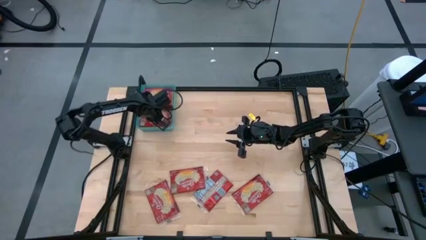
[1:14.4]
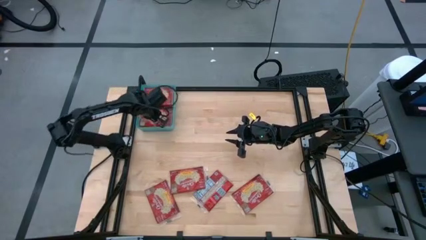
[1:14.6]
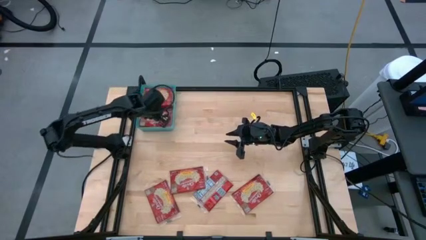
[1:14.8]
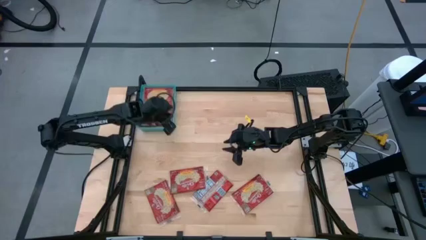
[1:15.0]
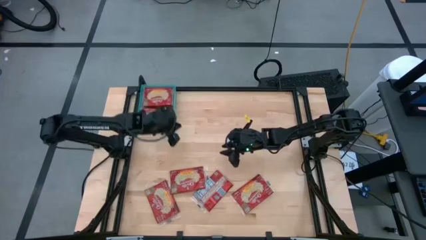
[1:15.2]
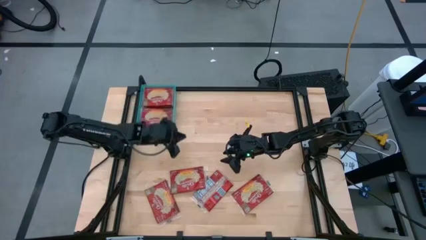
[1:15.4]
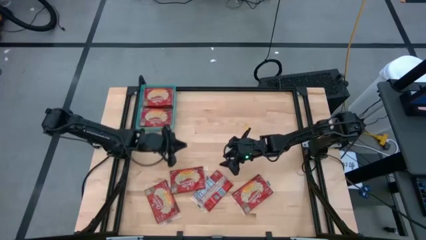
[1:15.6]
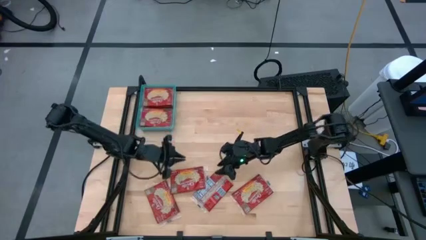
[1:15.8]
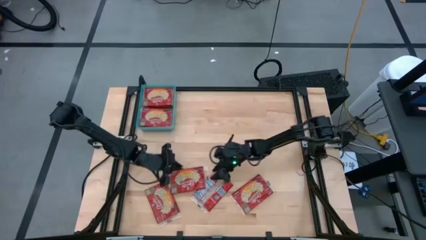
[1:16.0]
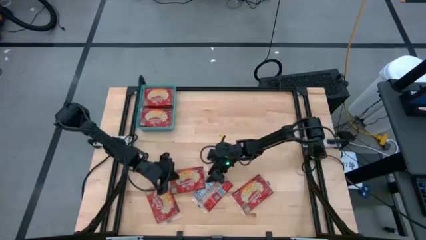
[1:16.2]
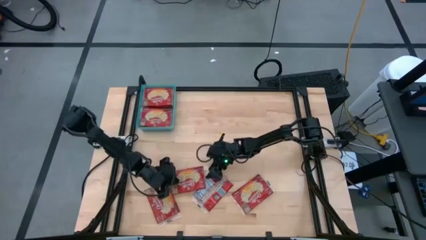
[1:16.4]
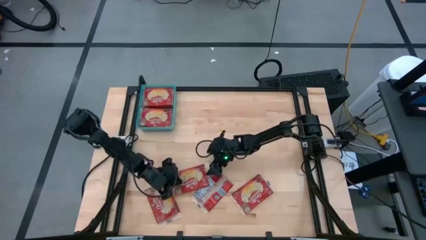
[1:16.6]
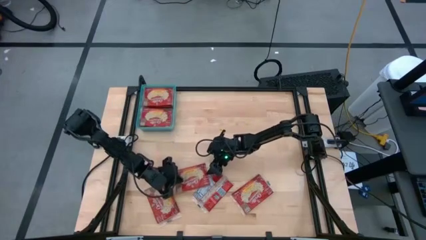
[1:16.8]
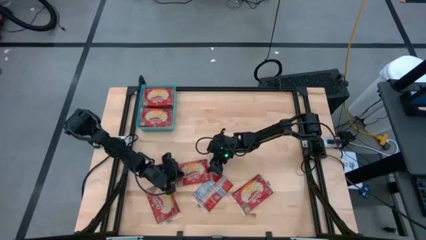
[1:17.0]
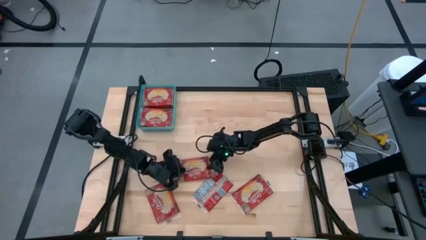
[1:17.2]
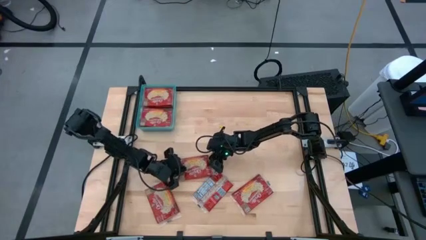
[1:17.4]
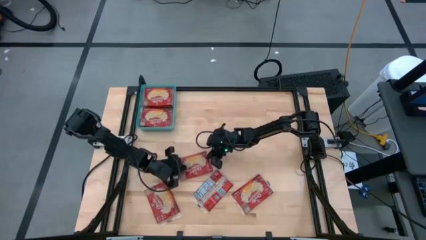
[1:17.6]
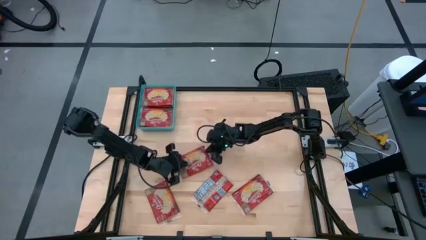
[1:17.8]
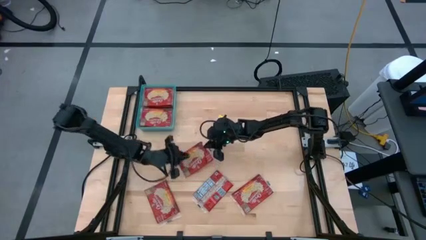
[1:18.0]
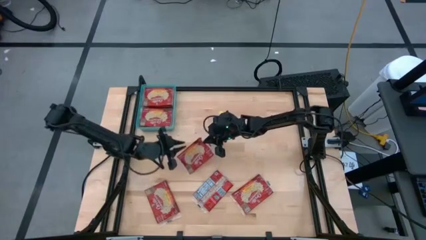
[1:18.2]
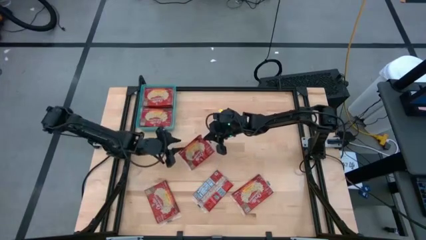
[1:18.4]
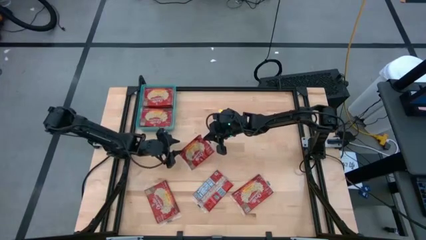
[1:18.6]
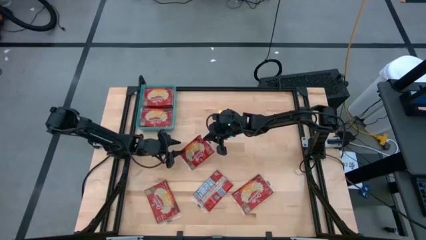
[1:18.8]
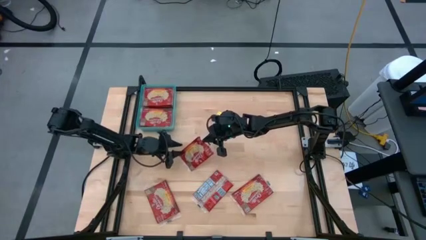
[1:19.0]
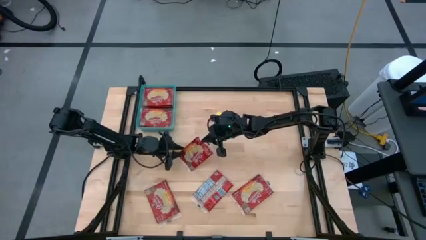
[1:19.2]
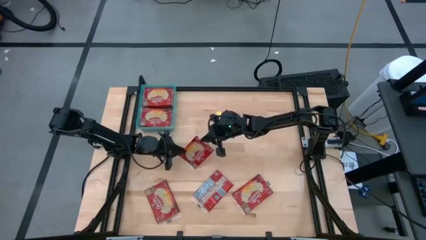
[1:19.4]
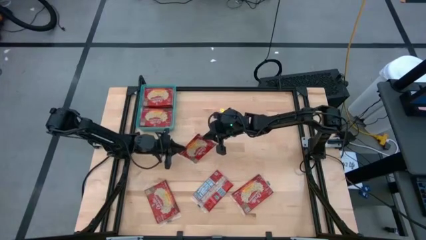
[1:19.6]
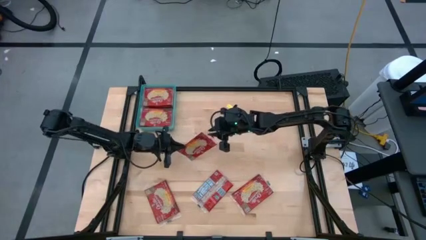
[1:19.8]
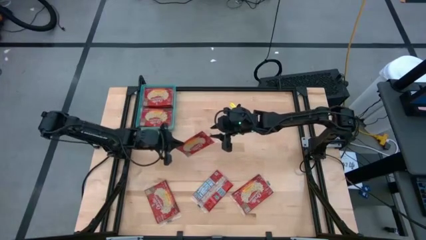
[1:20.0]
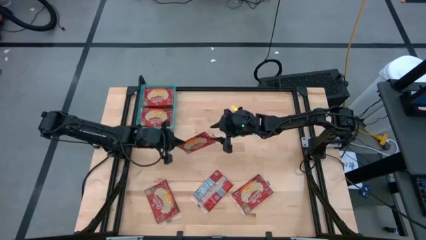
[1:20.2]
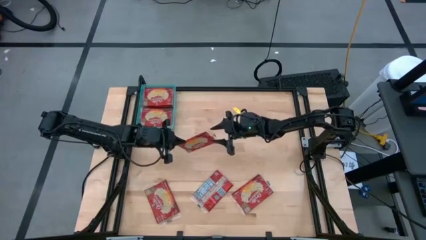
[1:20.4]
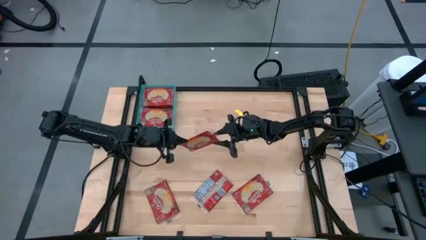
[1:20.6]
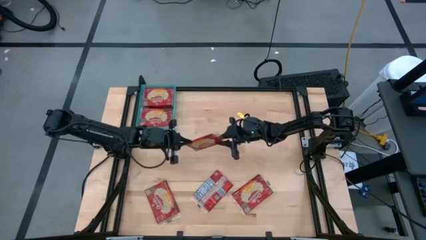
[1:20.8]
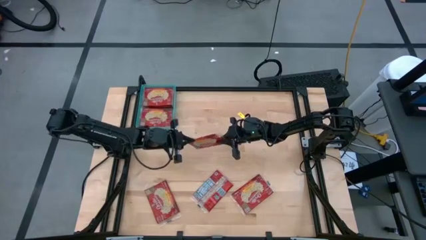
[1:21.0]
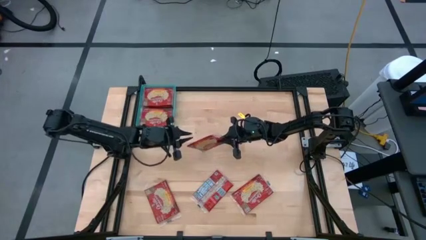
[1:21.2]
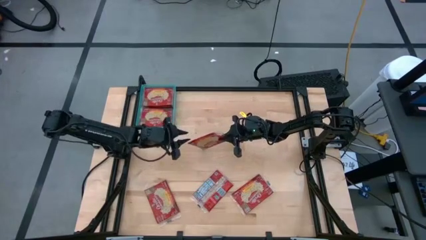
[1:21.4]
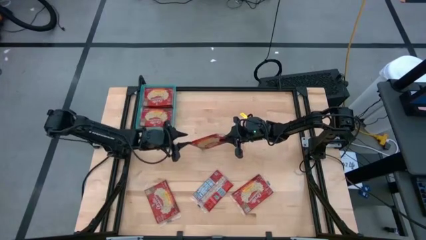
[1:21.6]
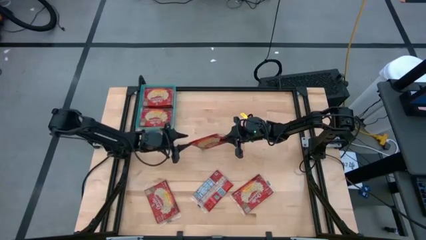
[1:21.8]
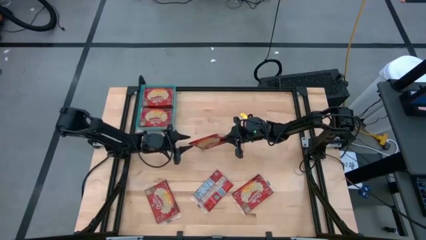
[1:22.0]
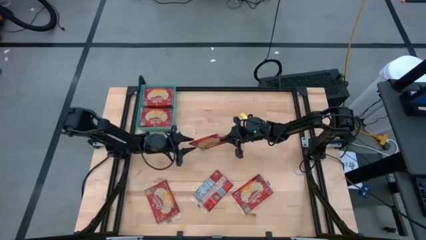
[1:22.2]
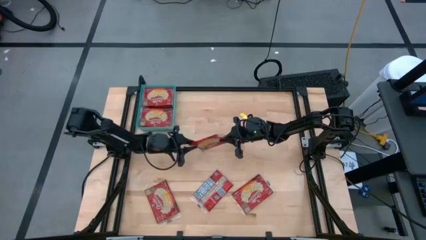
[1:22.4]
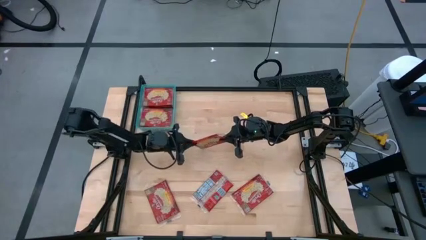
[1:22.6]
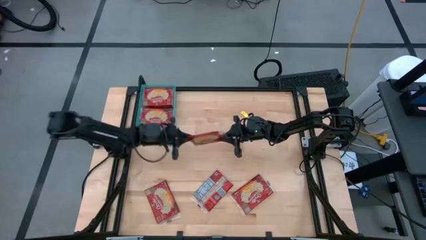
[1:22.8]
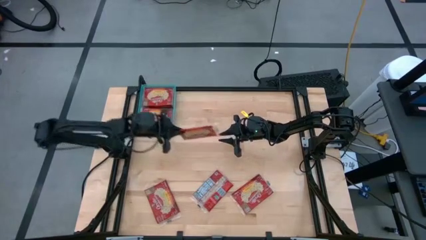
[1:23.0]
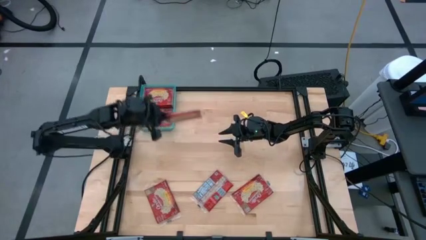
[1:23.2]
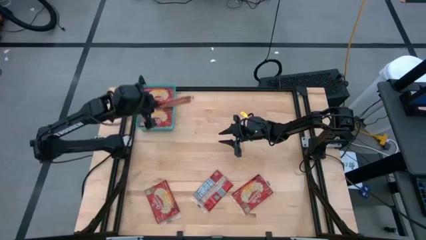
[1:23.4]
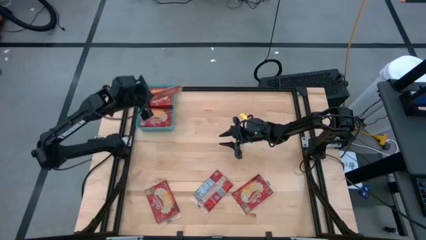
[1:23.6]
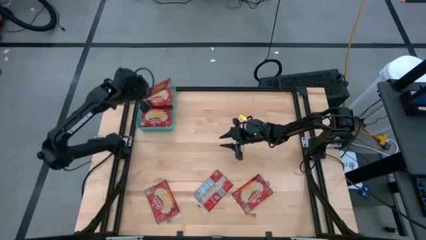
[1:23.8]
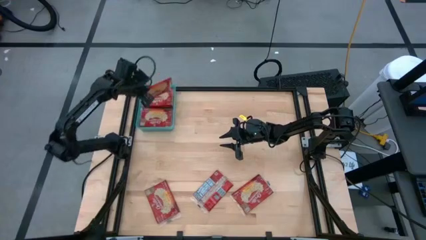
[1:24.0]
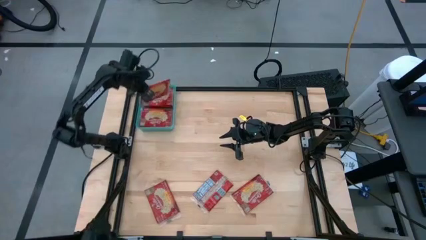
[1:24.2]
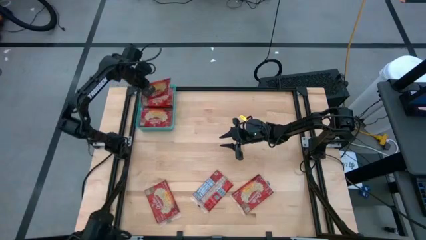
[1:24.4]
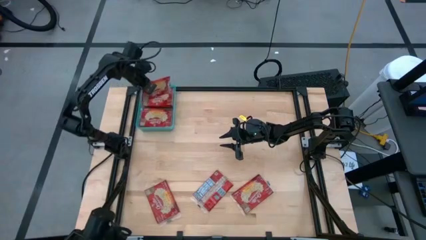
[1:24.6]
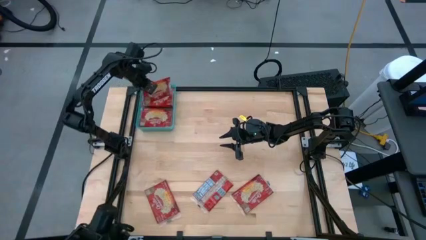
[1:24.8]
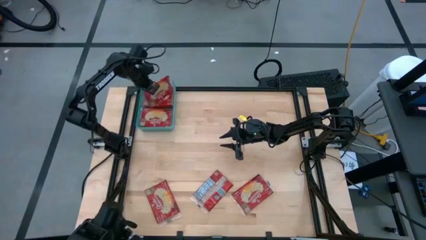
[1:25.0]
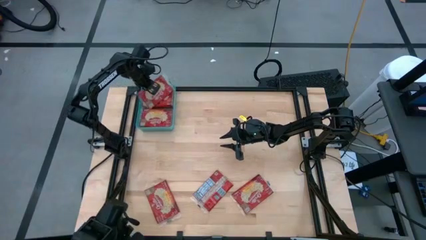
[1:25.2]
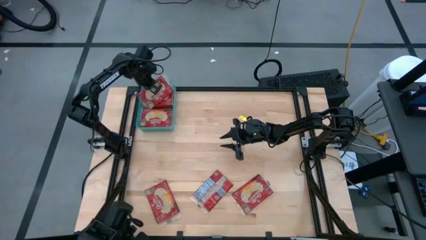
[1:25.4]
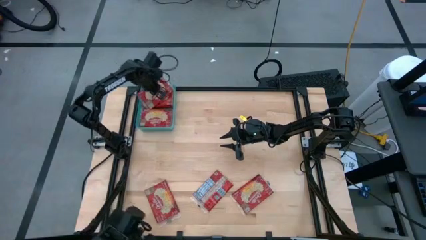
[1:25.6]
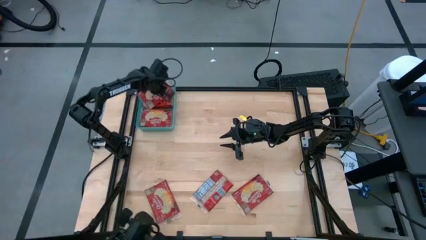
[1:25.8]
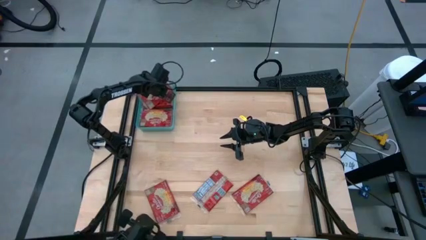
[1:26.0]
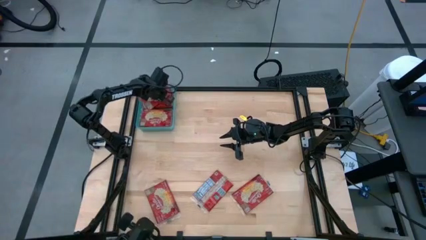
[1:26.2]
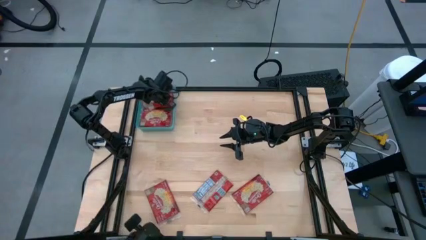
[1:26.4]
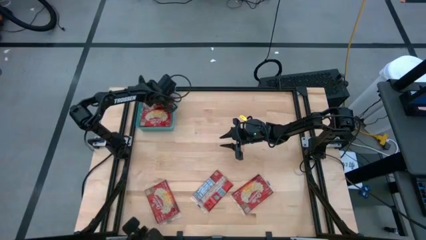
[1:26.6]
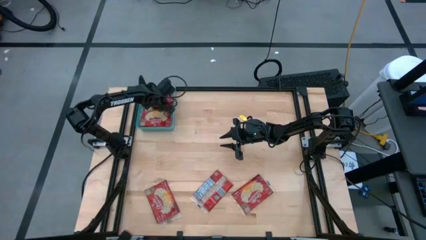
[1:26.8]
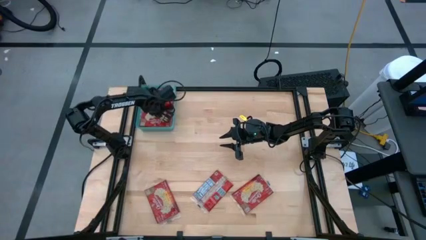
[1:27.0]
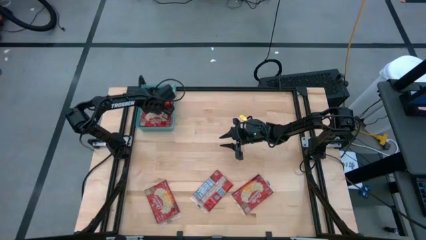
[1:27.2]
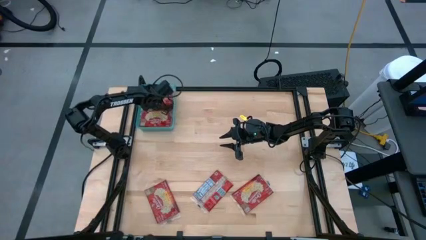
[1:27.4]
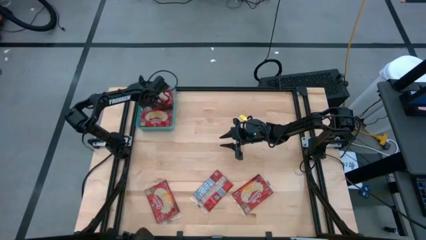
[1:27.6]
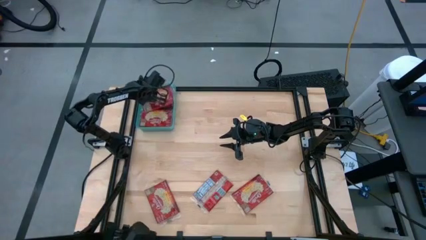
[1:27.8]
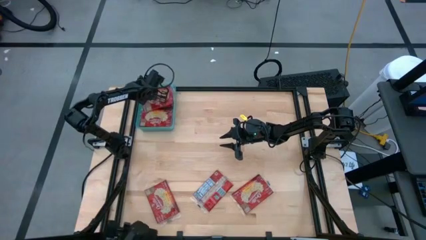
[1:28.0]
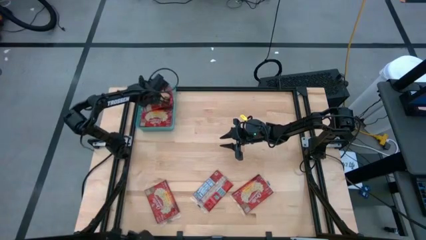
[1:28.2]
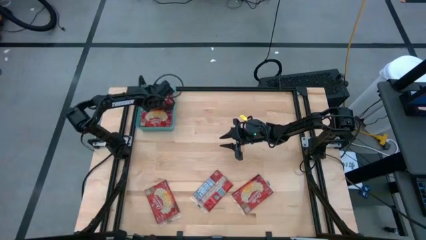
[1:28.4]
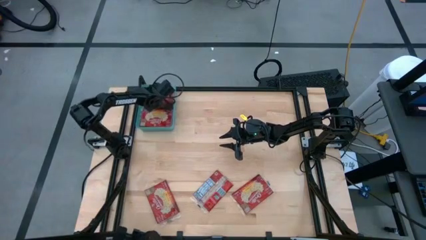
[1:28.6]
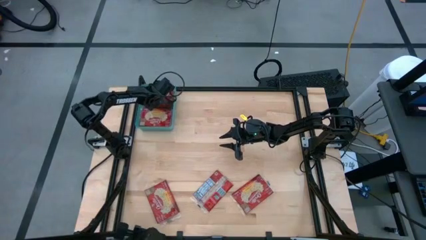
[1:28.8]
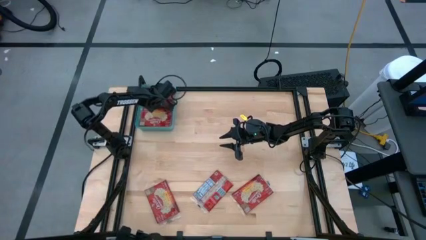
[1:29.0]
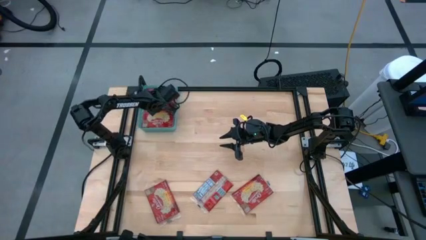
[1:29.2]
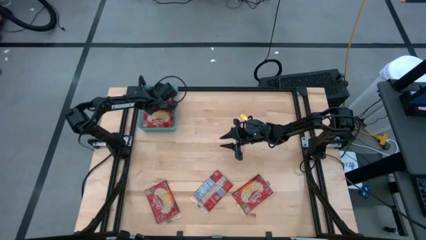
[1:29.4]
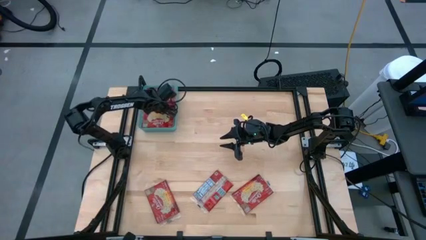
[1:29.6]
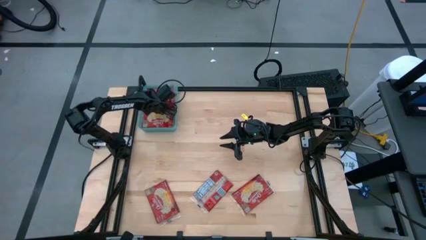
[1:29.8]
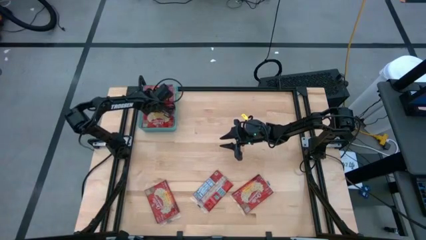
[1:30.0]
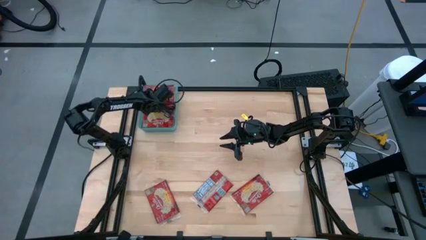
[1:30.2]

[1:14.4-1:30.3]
Task: Sort popcorn bags into baskets
Put the popcorn bag into the blue bin
